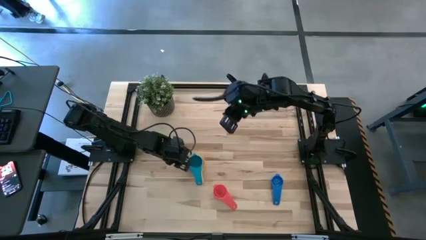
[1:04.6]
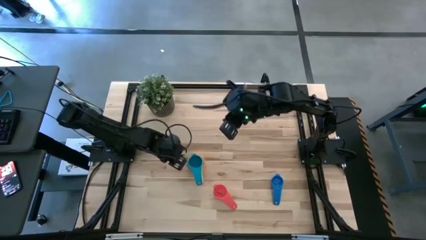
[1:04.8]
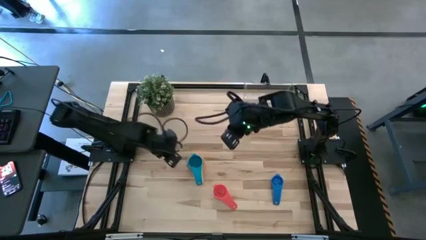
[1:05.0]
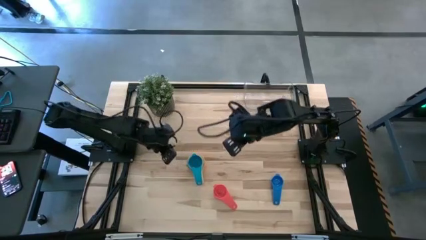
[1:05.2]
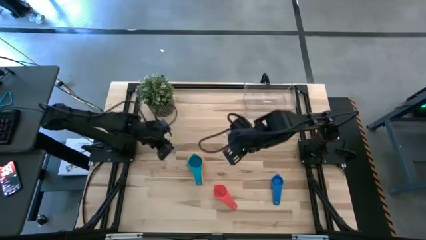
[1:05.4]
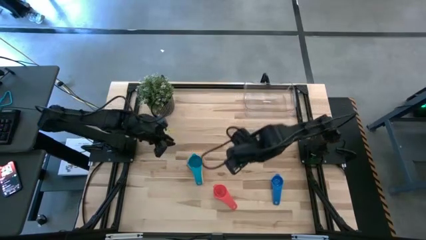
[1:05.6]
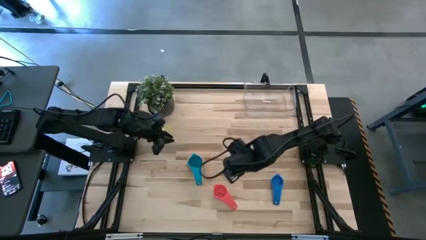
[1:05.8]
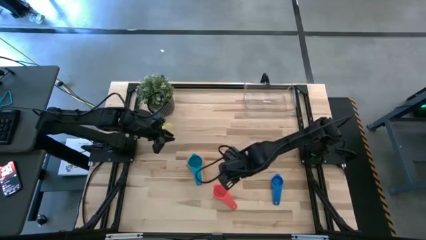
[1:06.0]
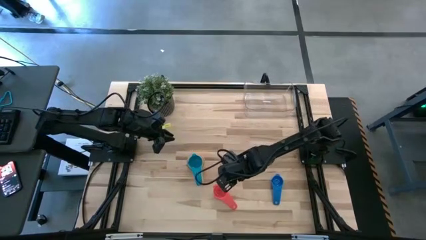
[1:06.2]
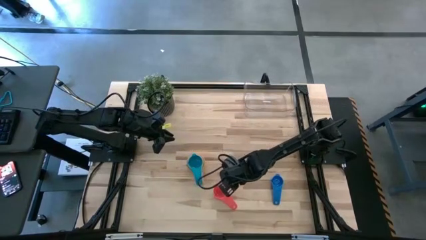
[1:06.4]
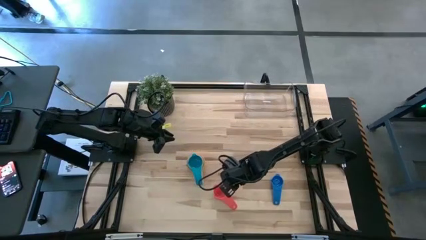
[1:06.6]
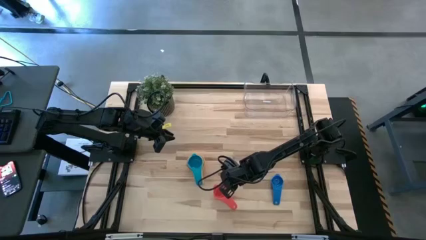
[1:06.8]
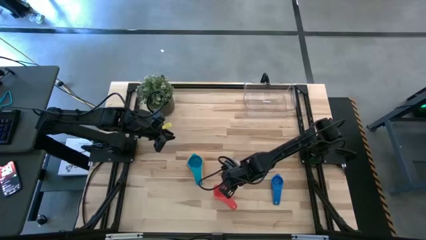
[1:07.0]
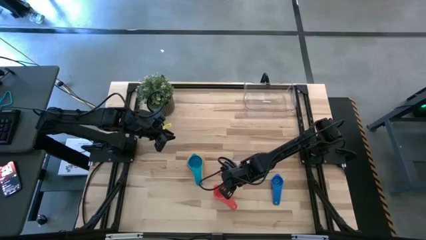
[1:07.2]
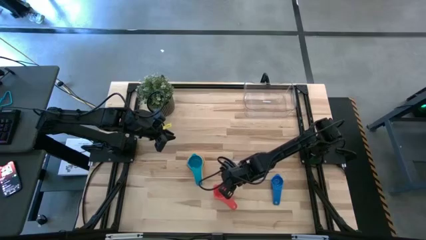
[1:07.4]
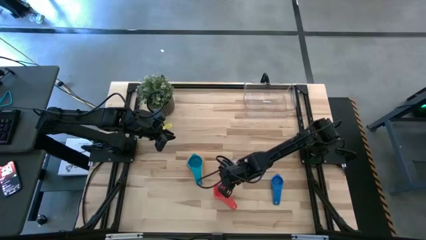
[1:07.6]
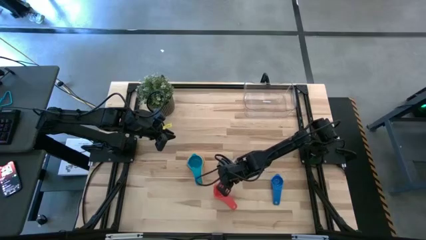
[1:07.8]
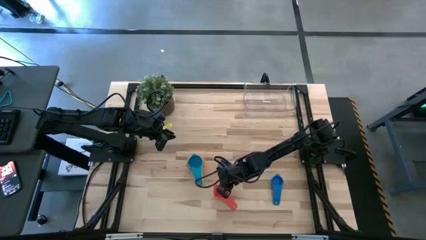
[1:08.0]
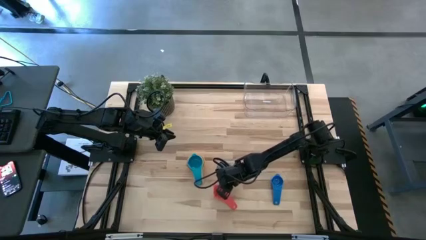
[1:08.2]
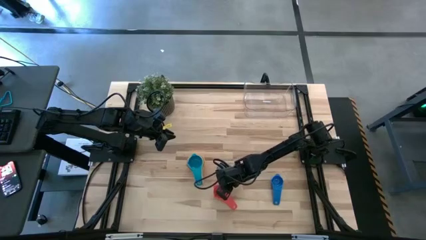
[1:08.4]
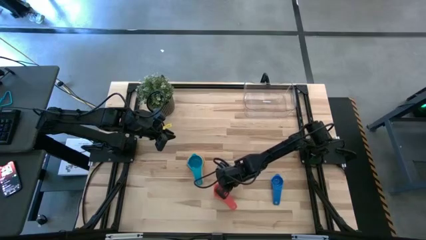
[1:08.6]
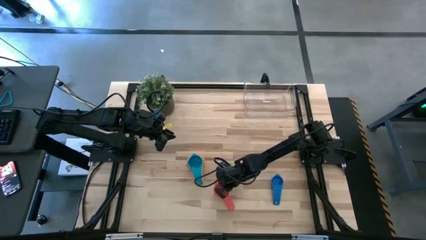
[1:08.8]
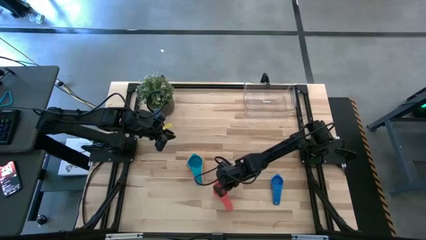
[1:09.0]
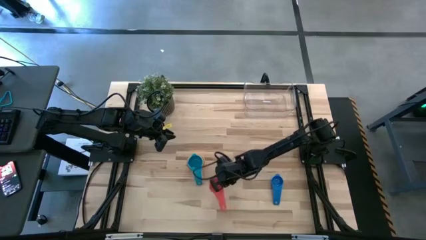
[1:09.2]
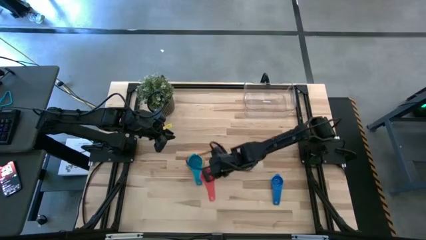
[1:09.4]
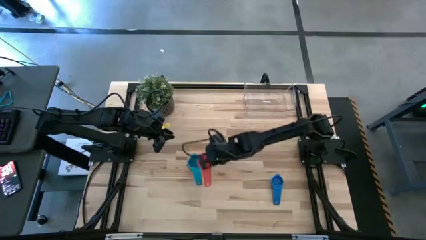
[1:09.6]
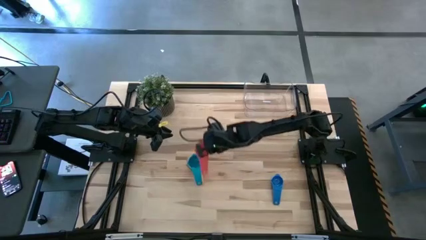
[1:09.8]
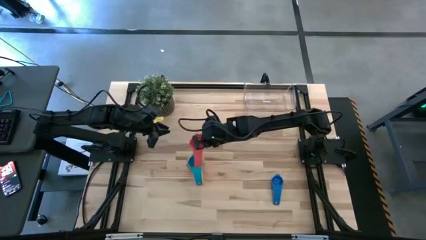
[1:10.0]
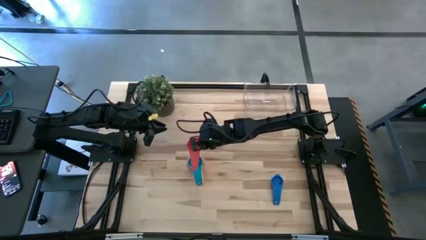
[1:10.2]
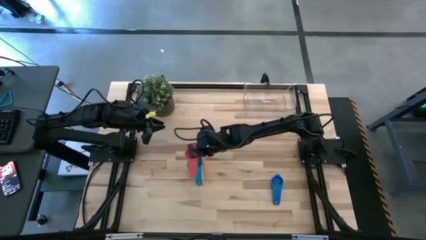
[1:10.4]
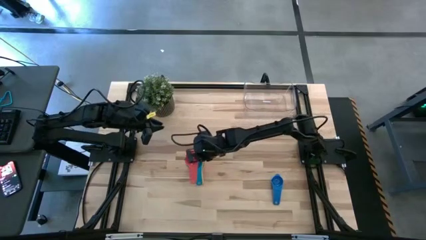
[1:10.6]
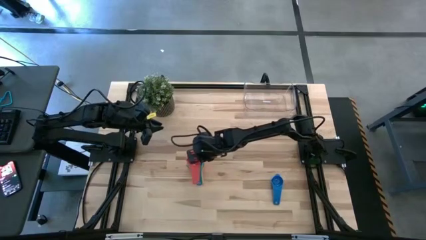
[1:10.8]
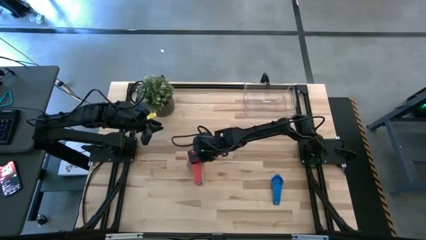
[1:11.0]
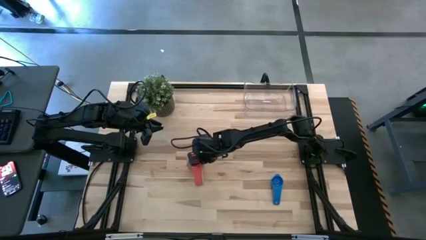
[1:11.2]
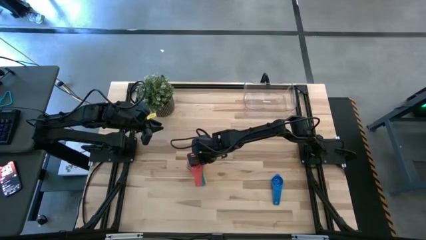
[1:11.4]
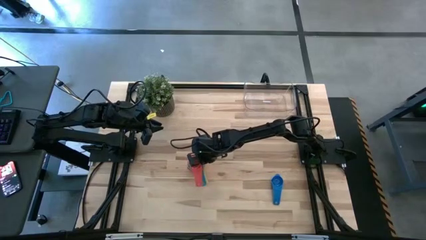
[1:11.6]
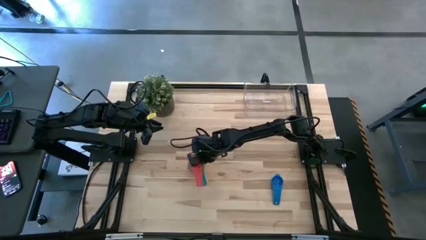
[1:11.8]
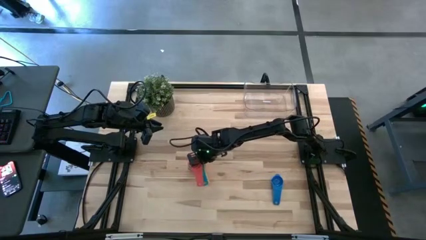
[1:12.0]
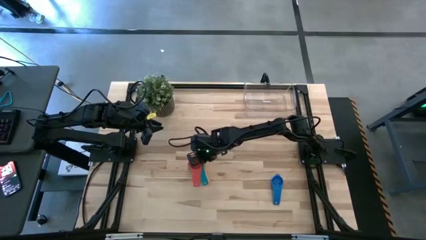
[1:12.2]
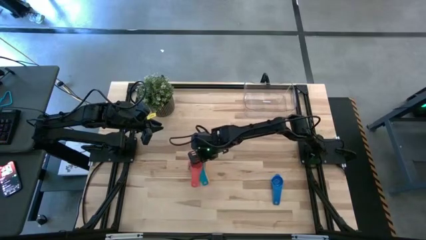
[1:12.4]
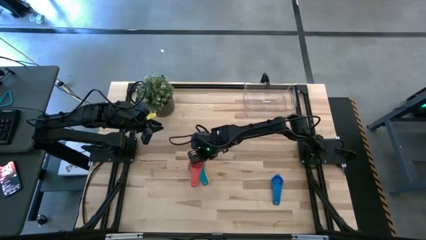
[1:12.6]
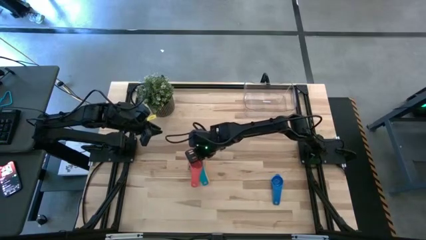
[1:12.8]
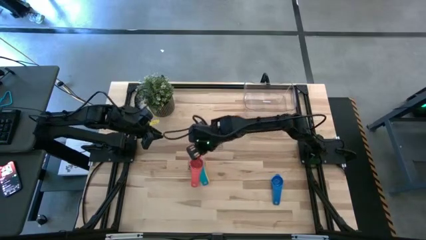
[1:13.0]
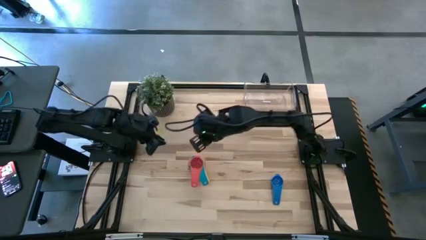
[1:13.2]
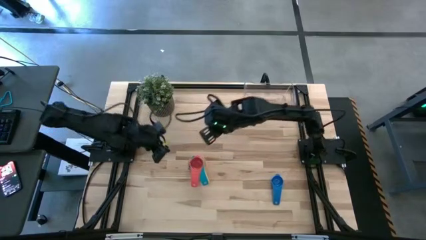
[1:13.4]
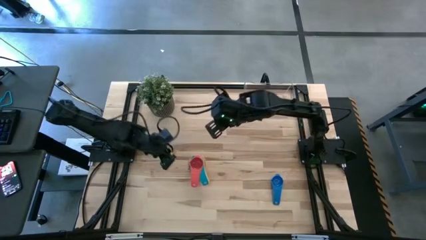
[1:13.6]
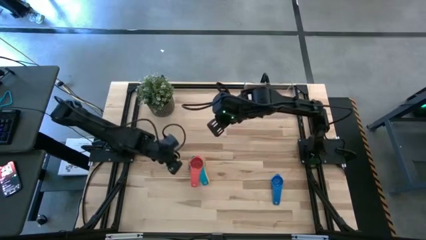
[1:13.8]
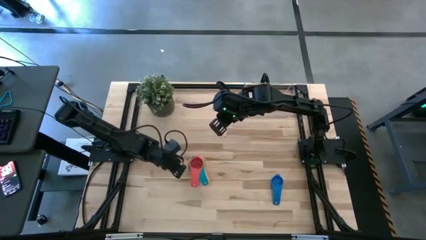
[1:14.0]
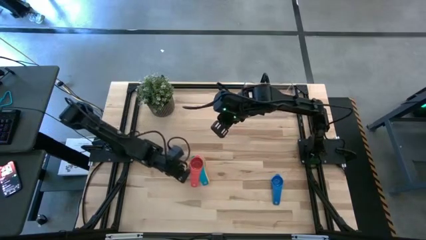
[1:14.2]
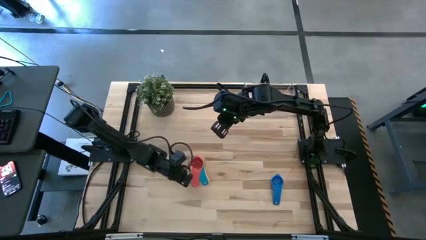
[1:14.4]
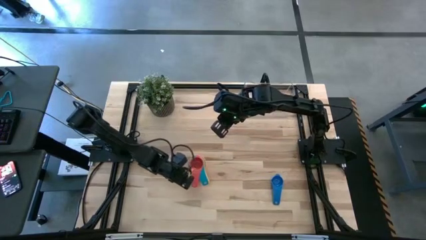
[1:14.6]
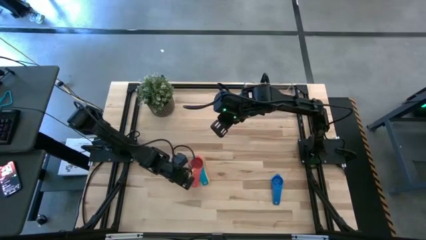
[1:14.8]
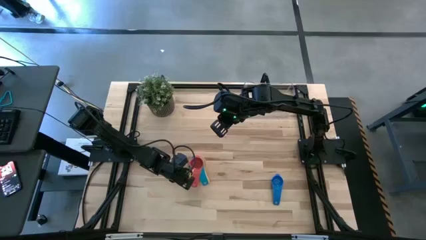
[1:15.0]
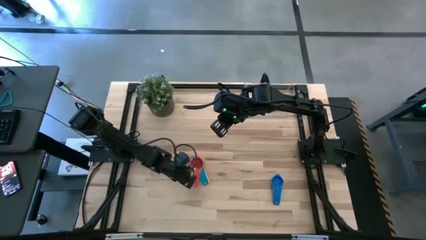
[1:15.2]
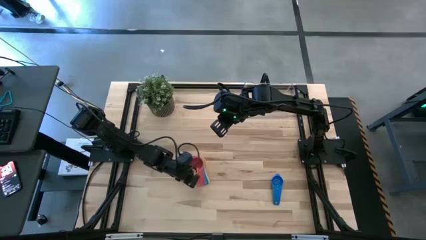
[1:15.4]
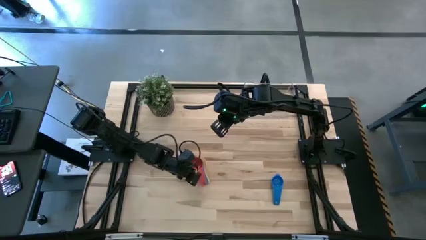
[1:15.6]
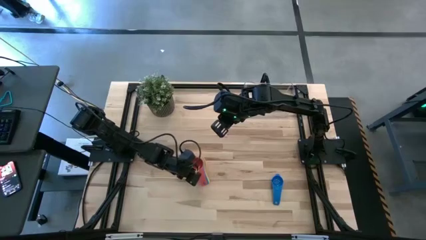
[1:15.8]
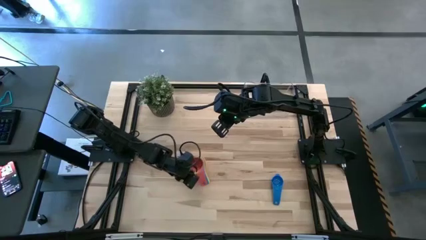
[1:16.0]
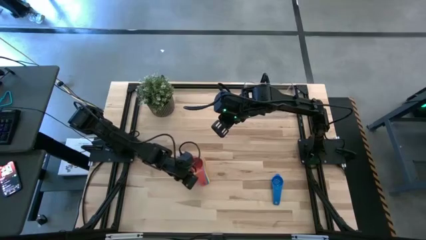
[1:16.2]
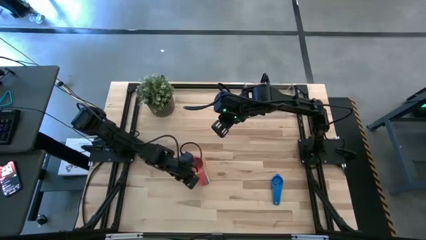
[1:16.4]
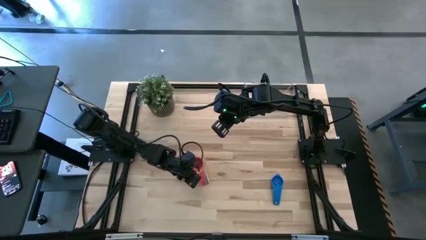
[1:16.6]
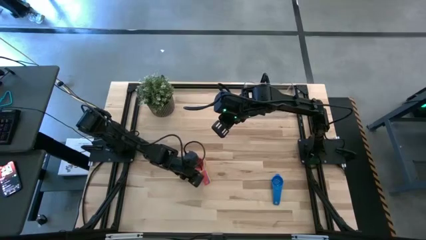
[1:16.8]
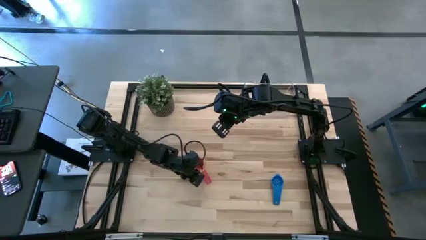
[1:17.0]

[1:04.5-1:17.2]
Task: Nest measuring cups in basket
Stack the red measuring cup on top of the light blue measuring cup
